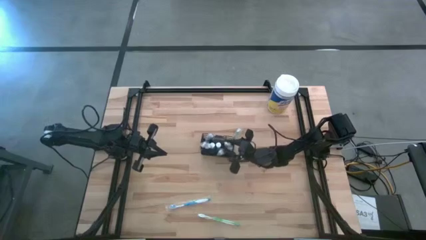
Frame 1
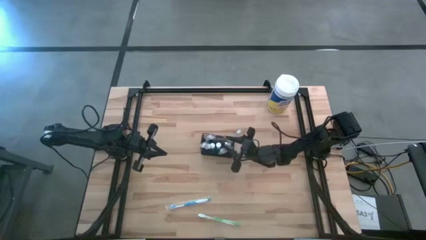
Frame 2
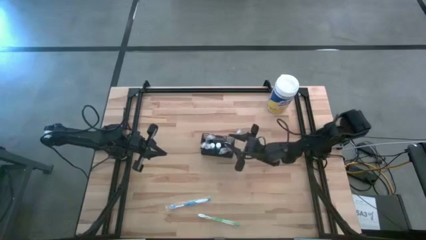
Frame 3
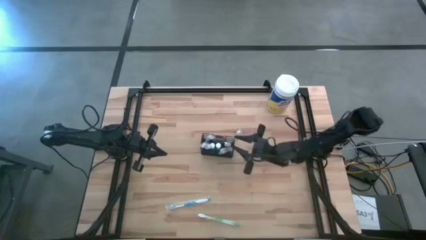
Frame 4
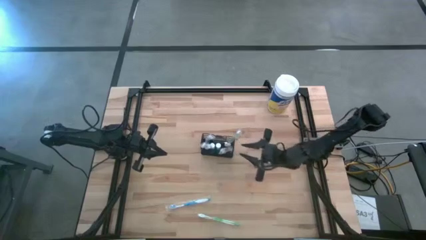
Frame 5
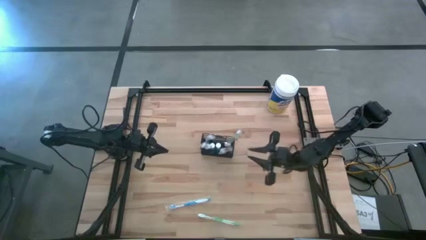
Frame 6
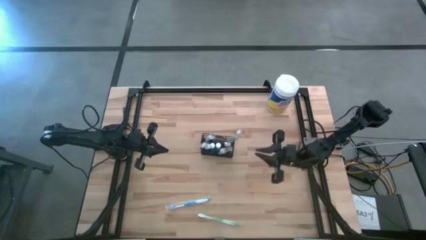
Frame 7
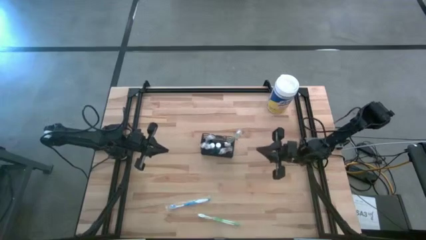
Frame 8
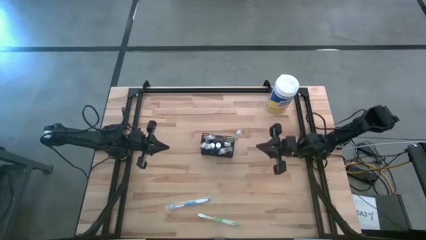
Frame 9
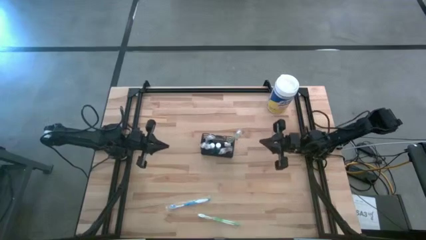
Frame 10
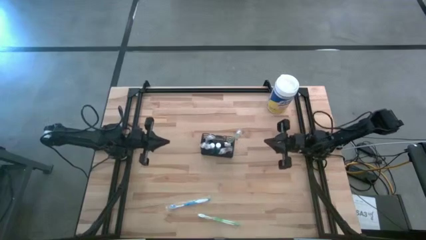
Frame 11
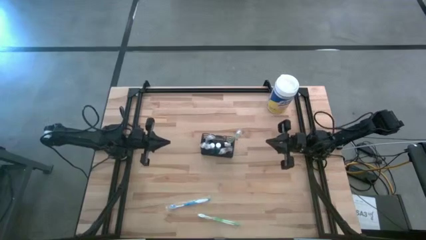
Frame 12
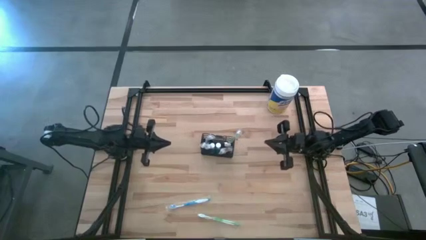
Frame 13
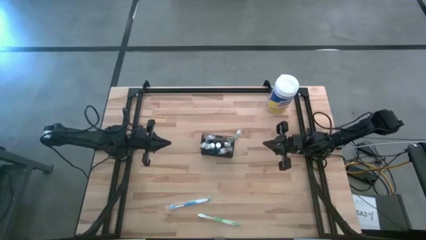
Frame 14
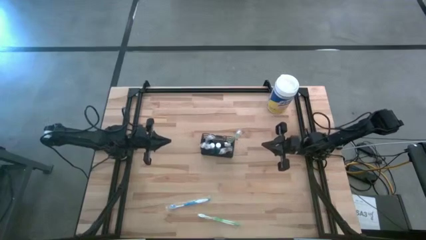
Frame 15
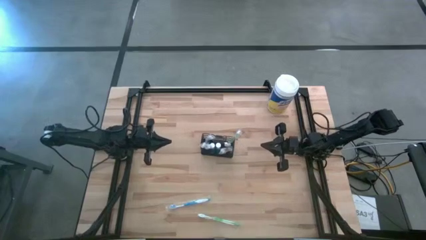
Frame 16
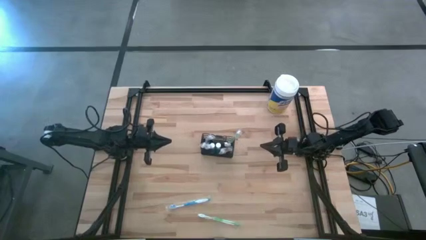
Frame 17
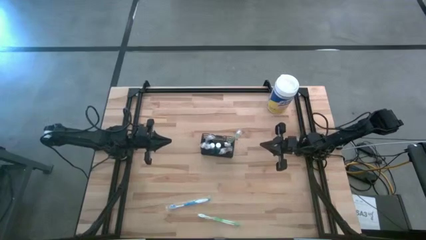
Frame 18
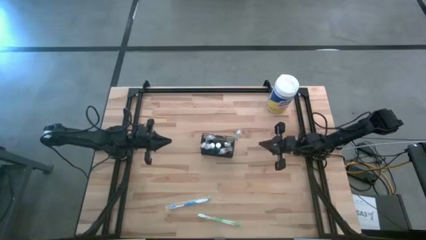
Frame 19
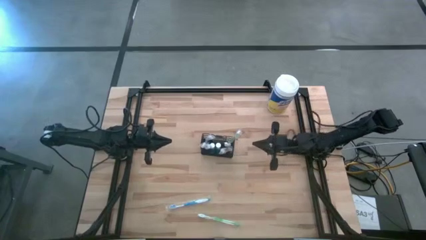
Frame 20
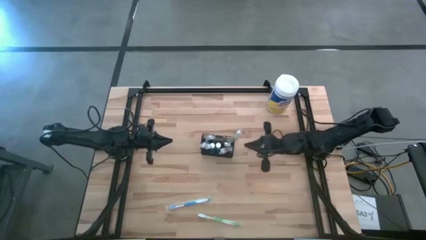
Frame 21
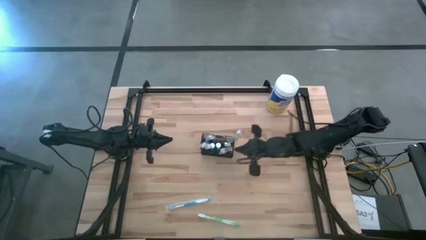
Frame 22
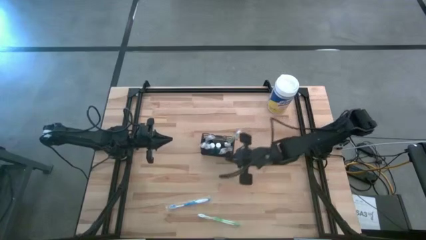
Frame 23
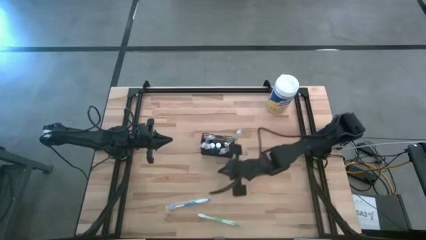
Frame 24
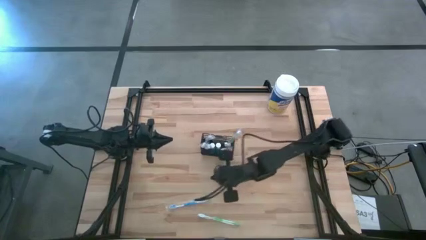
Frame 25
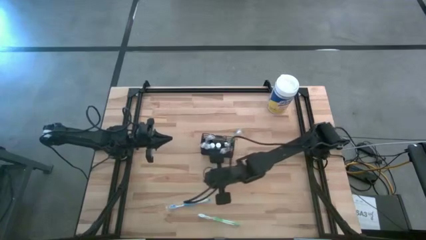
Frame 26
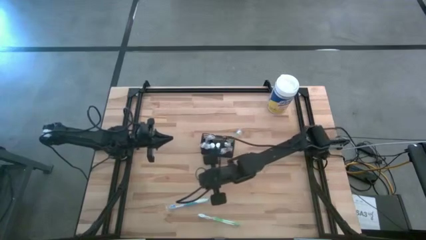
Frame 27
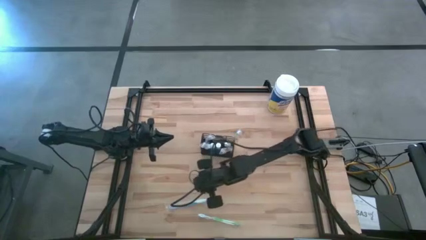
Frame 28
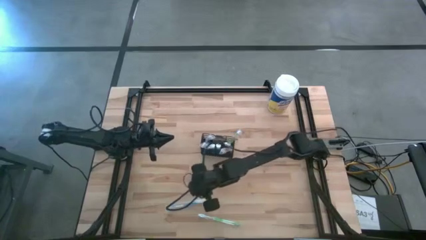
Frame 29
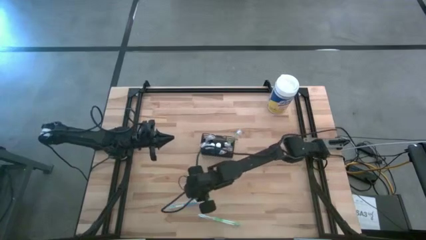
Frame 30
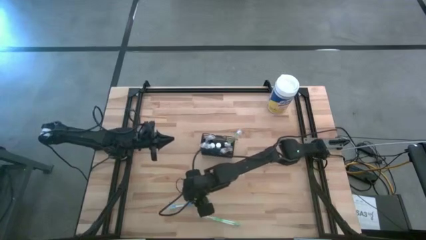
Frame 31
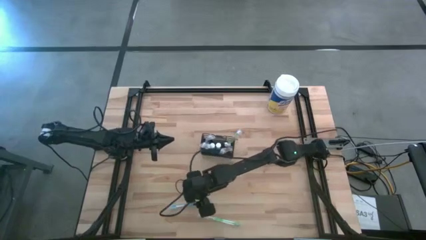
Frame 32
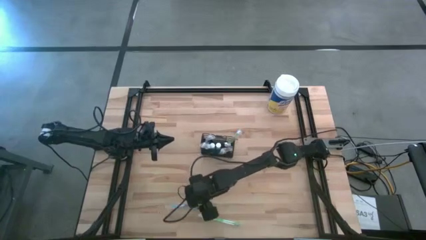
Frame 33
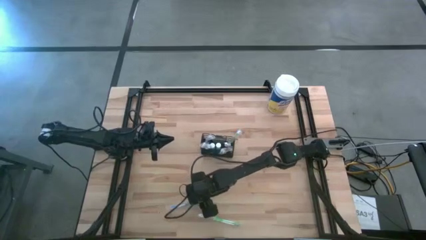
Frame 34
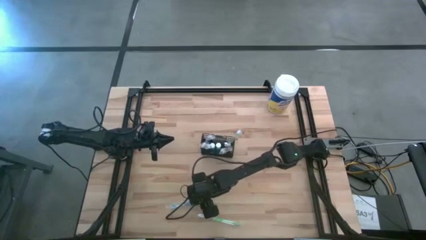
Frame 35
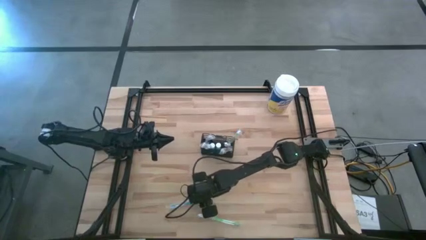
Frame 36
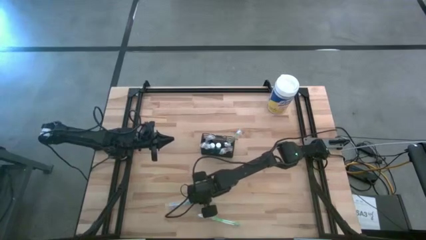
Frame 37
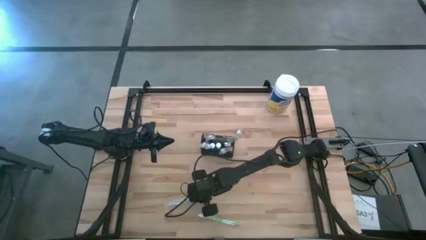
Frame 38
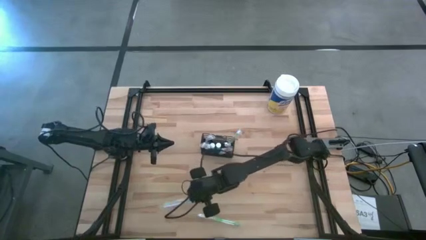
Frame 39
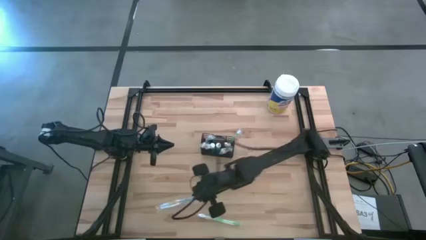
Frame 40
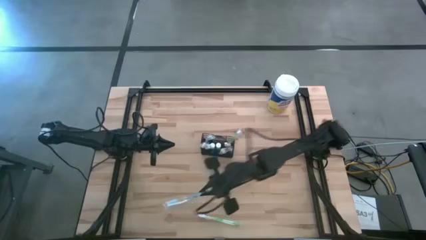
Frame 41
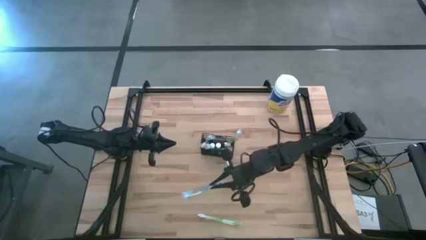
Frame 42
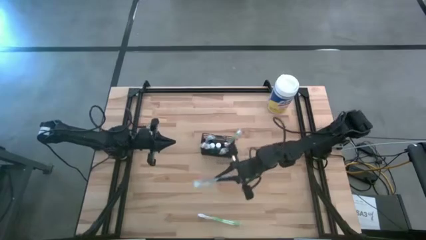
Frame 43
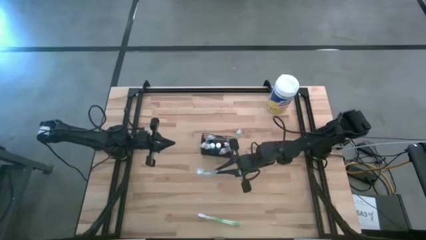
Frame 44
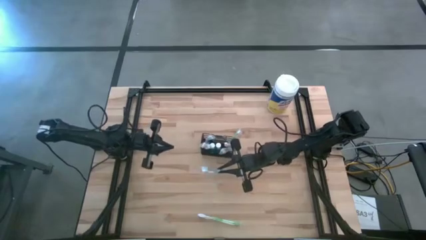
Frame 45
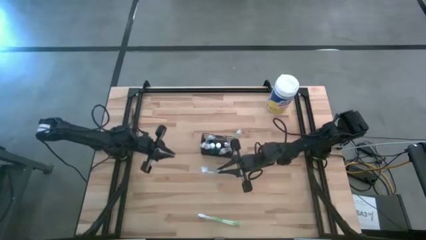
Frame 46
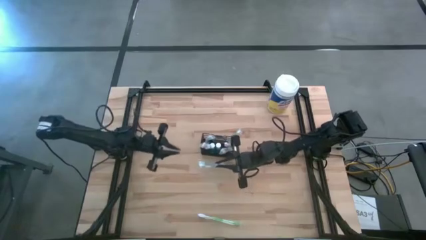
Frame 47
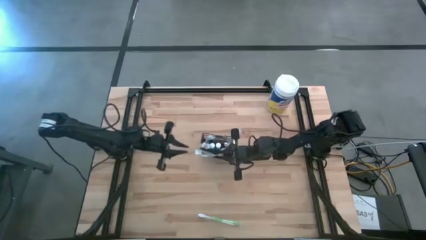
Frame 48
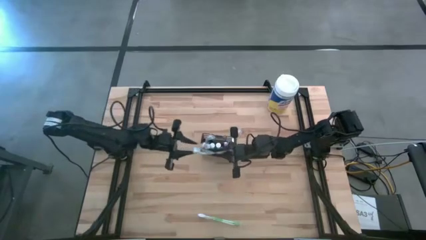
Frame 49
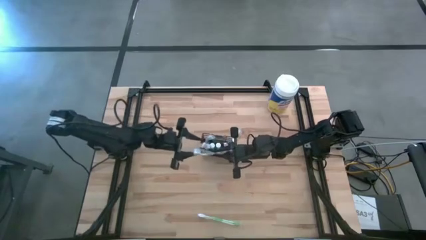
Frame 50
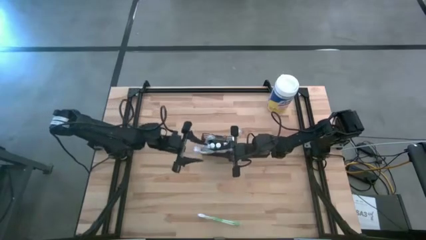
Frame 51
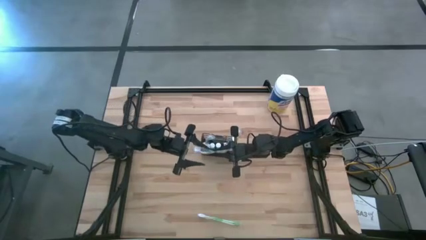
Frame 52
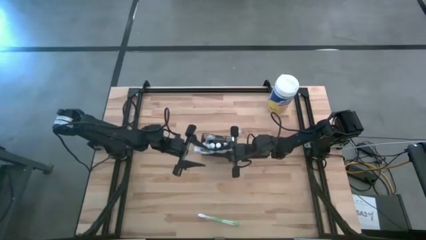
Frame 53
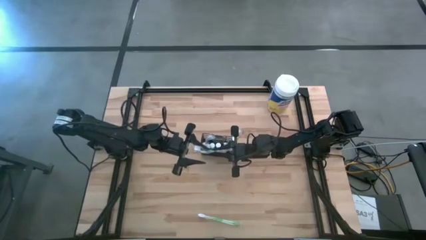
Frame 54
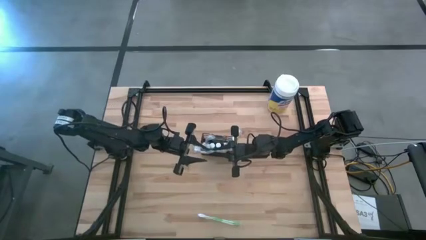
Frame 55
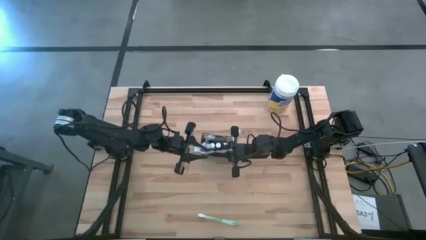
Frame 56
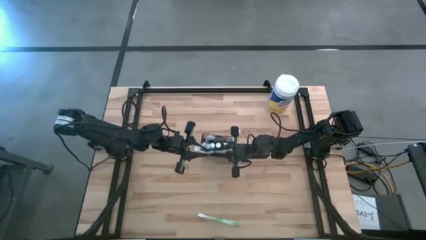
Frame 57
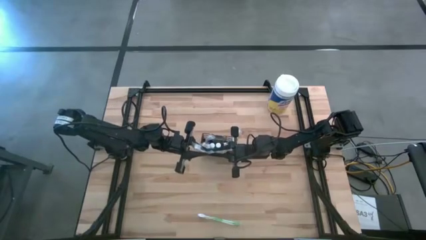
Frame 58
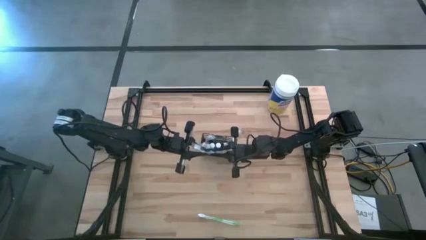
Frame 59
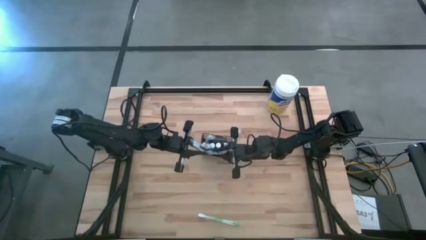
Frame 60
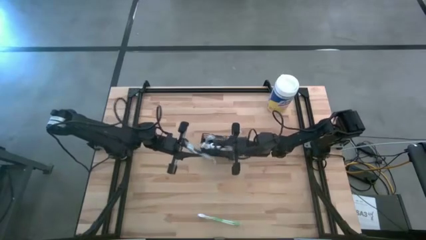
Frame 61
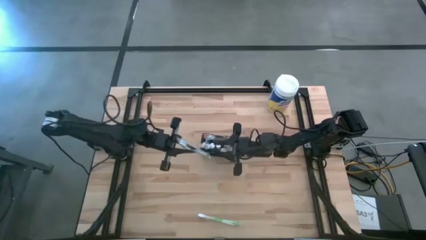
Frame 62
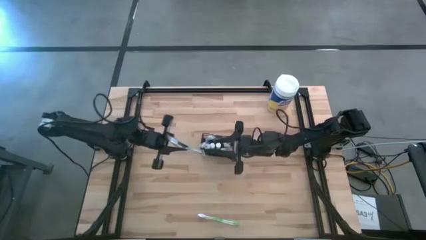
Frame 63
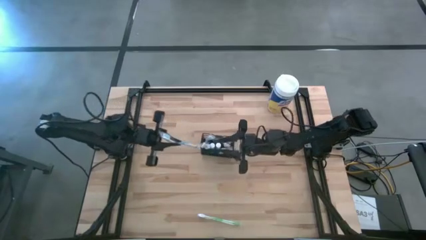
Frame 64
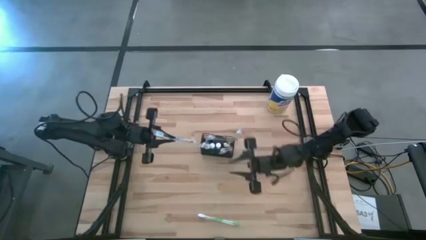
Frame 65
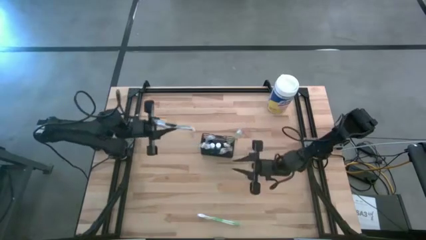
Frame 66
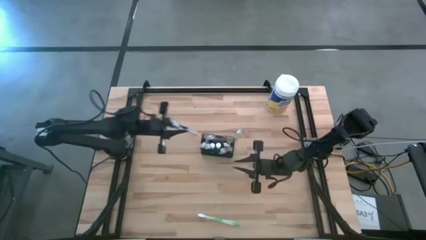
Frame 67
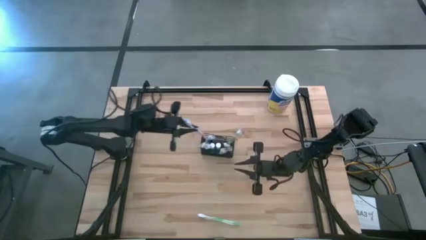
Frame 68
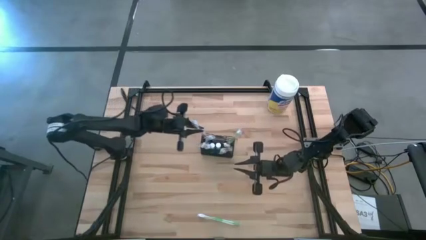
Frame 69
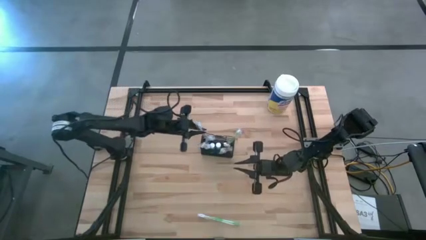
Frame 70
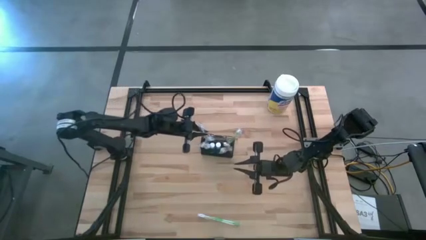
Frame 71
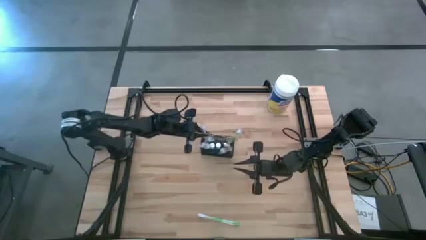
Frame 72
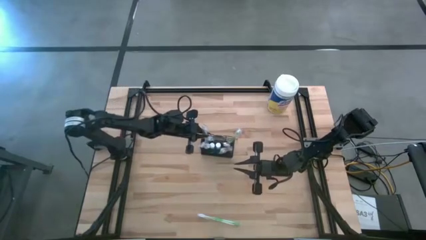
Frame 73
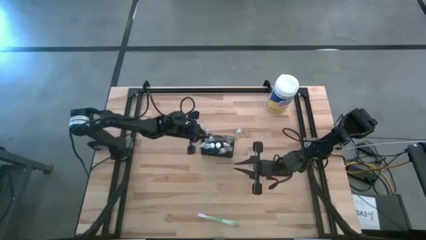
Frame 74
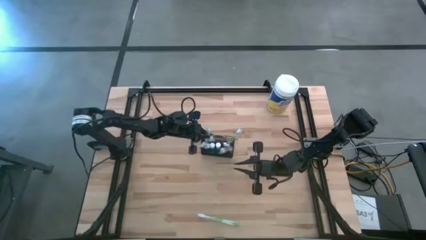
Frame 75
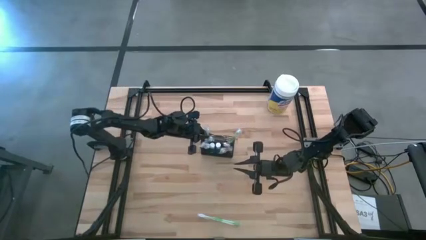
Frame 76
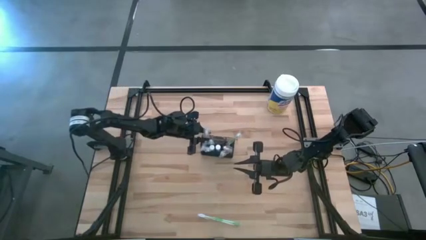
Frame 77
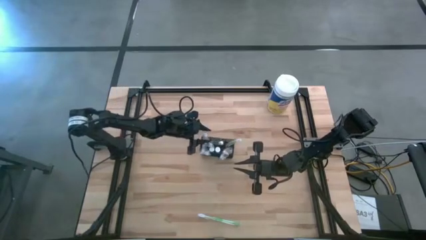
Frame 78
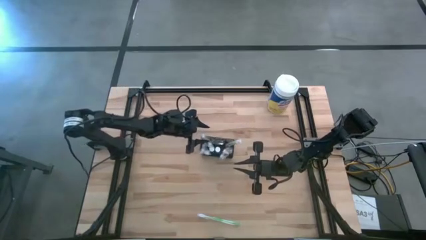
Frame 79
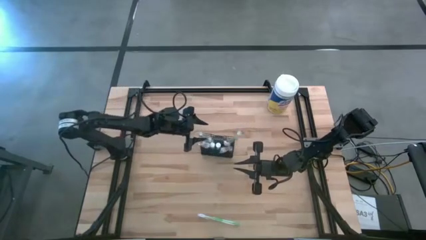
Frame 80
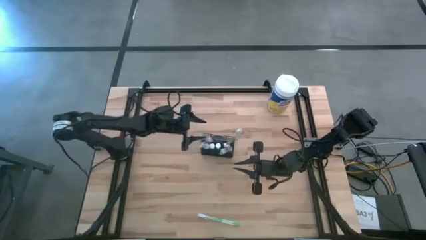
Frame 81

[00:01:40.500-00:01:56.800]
Task: Pick & Place toothbrushing station
Put the blue toothbrush into the wire organizer

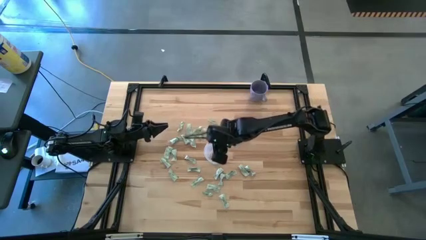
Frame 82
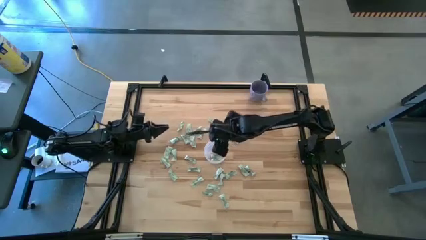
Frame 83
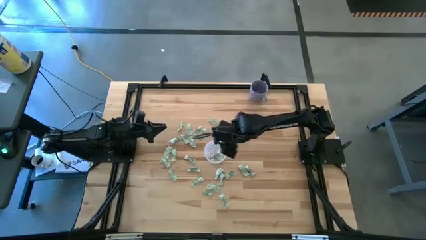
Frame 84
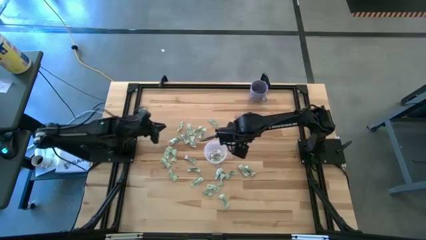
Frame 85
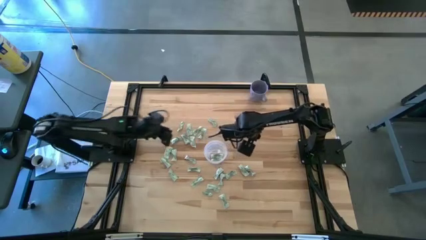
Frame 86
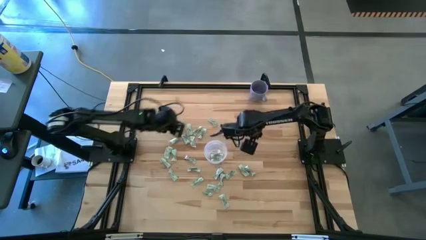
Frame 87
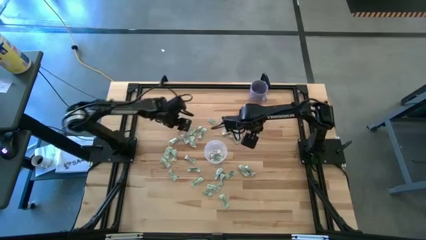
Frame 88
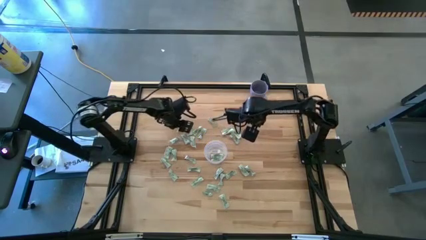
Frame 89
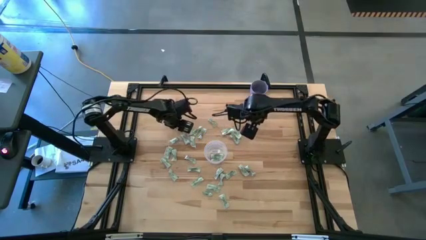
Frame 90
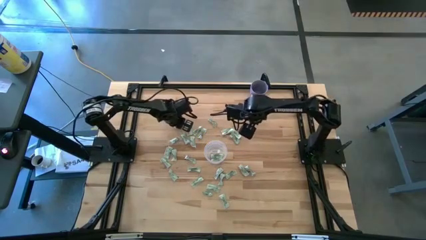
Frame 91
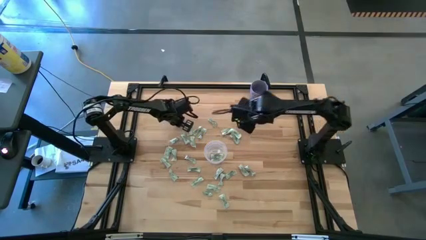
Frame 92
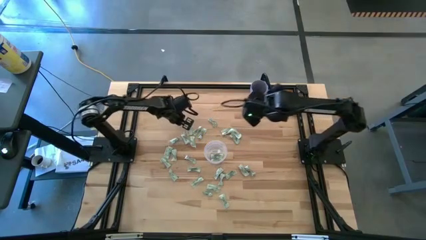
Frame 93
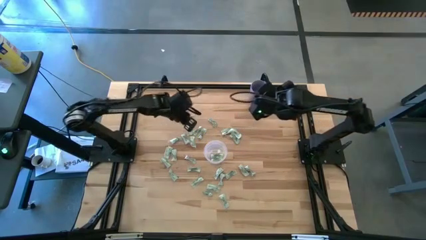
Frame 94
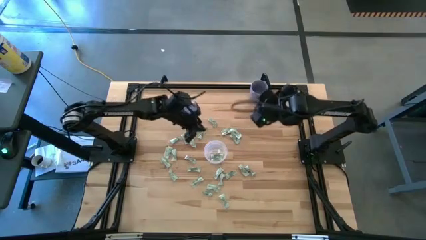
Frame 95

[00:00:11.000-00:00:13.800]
Task: Pick and place Stevia / Truvia into bins
Put the green stevia packet into the transparent container
